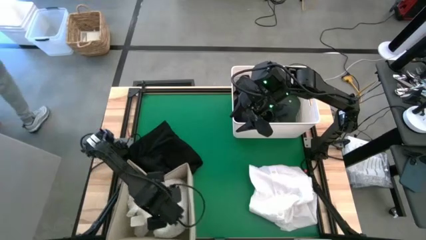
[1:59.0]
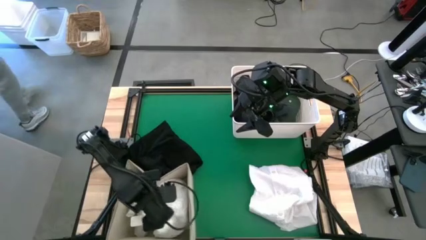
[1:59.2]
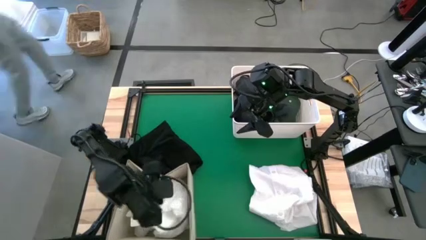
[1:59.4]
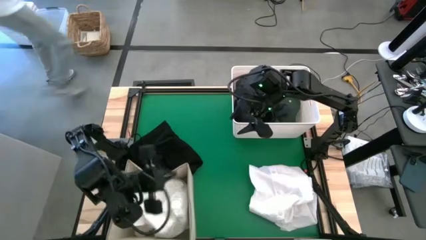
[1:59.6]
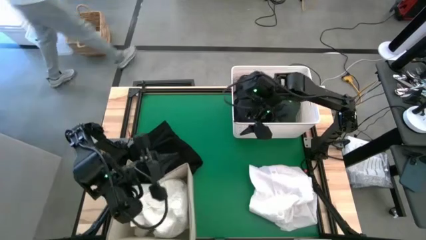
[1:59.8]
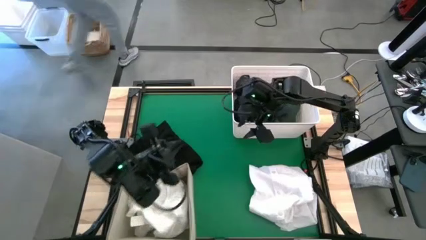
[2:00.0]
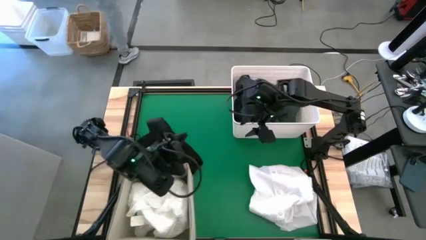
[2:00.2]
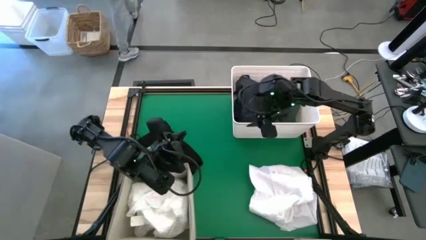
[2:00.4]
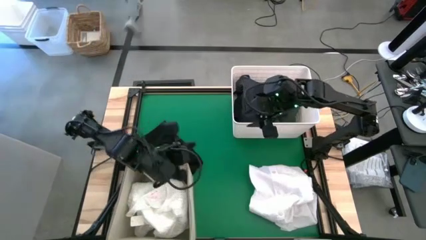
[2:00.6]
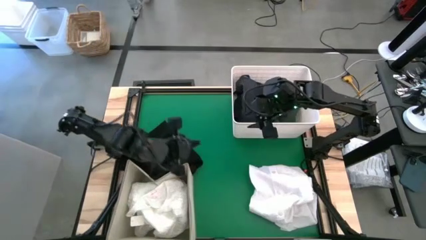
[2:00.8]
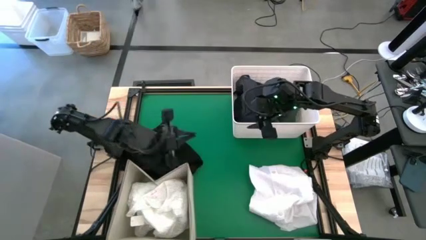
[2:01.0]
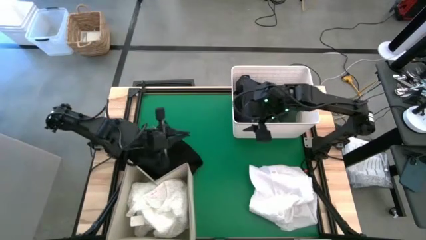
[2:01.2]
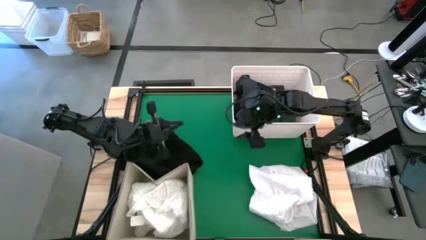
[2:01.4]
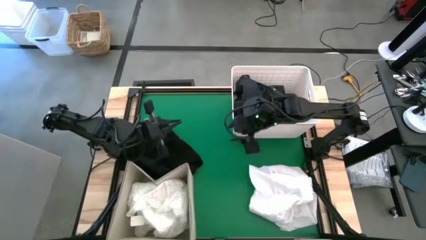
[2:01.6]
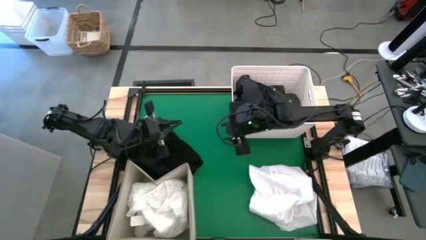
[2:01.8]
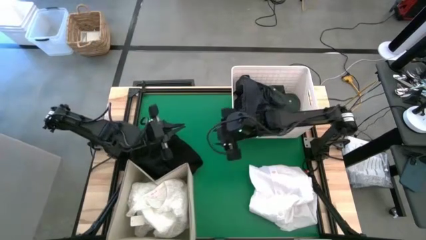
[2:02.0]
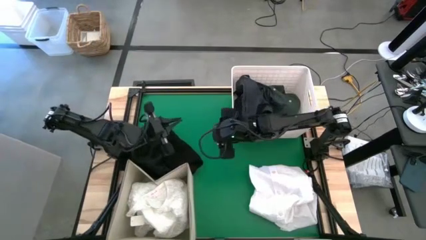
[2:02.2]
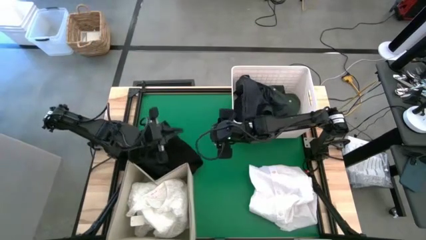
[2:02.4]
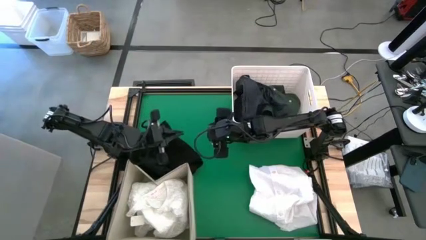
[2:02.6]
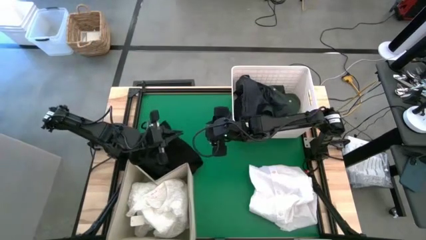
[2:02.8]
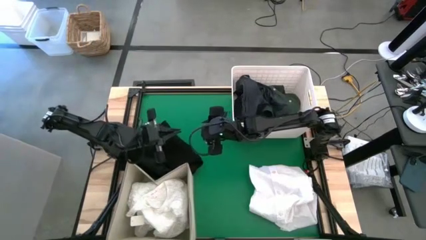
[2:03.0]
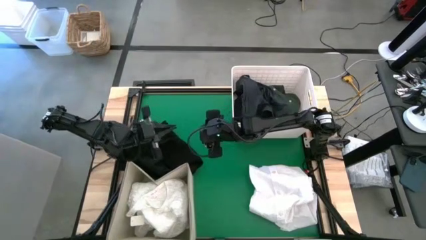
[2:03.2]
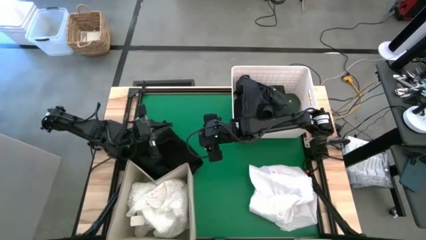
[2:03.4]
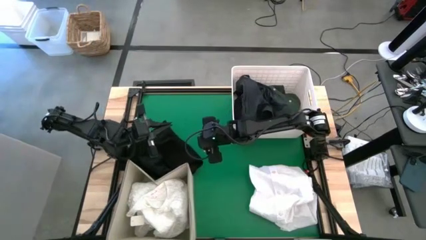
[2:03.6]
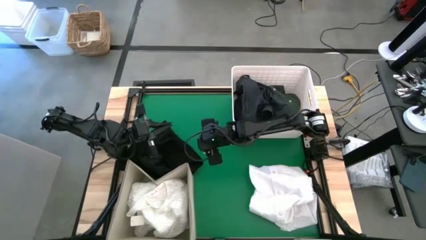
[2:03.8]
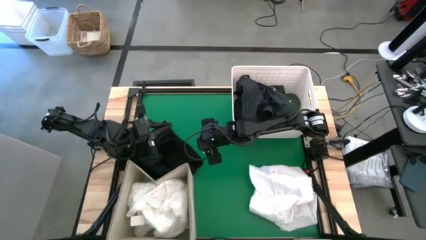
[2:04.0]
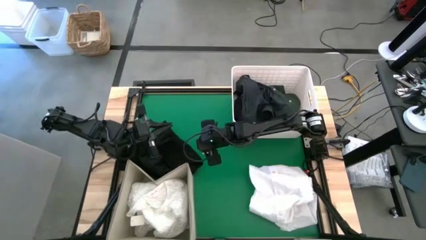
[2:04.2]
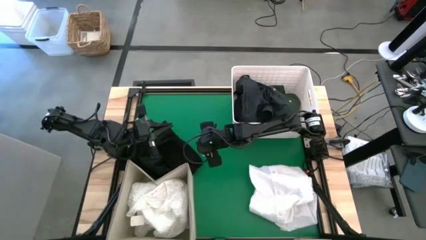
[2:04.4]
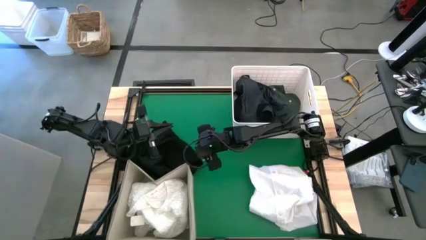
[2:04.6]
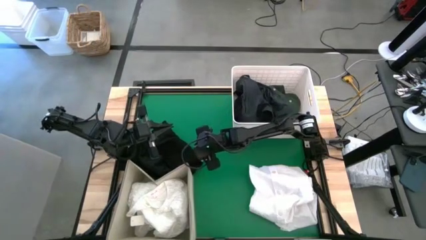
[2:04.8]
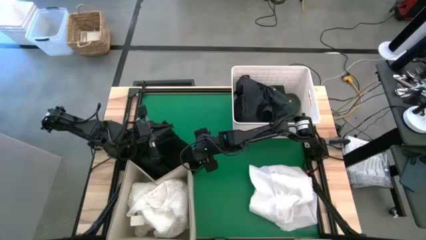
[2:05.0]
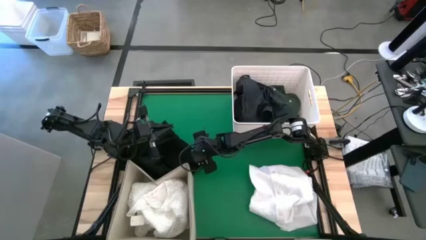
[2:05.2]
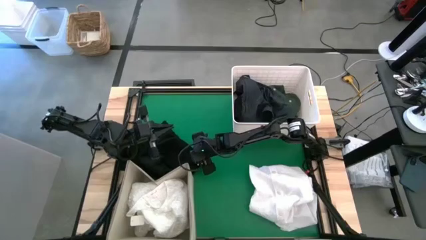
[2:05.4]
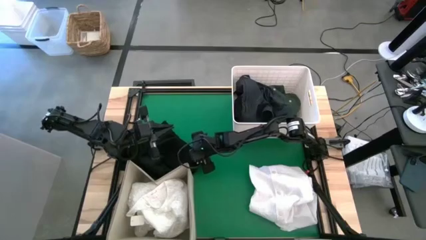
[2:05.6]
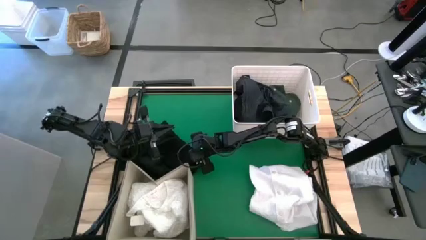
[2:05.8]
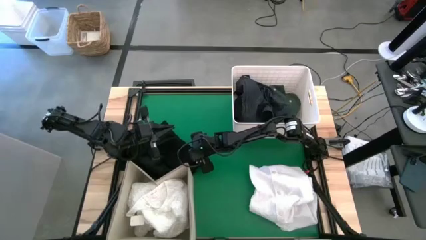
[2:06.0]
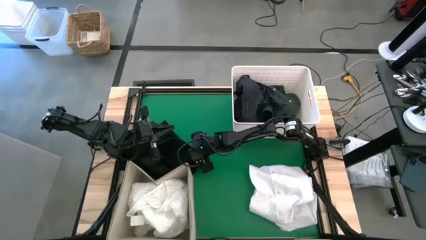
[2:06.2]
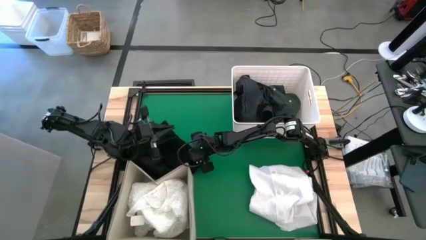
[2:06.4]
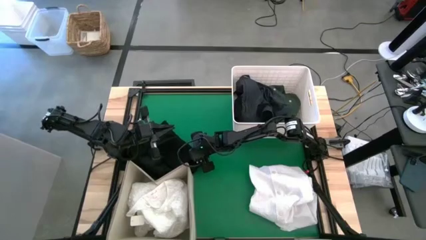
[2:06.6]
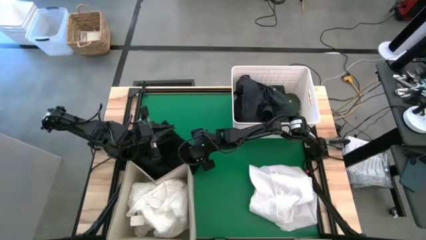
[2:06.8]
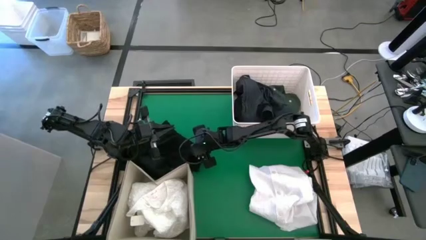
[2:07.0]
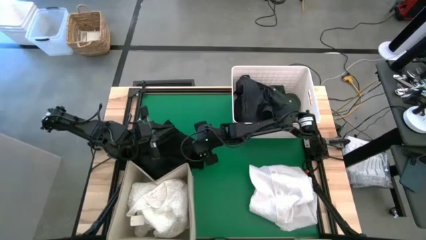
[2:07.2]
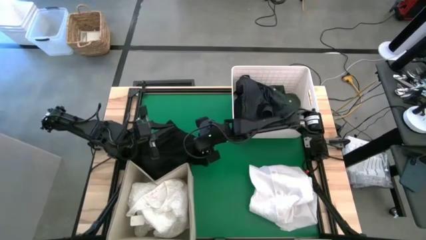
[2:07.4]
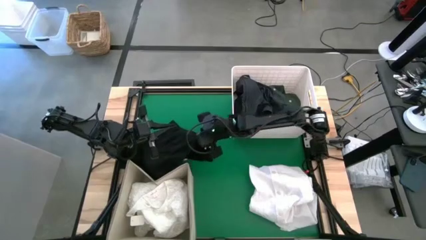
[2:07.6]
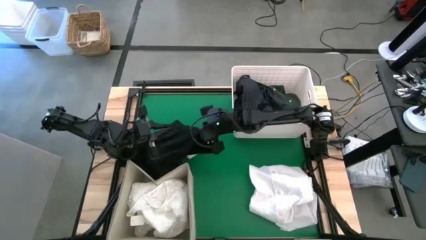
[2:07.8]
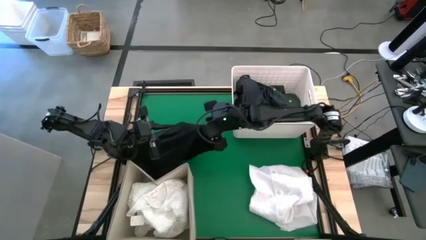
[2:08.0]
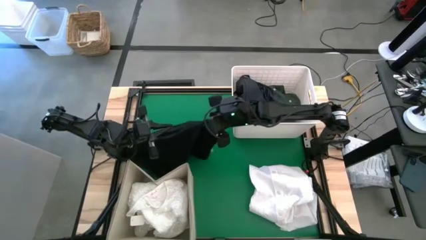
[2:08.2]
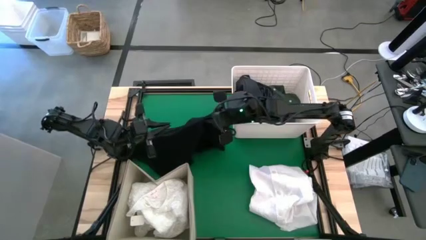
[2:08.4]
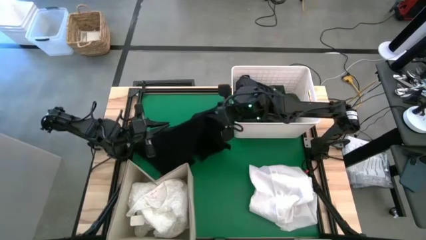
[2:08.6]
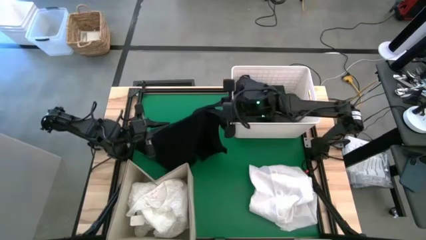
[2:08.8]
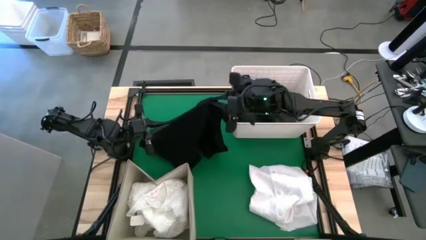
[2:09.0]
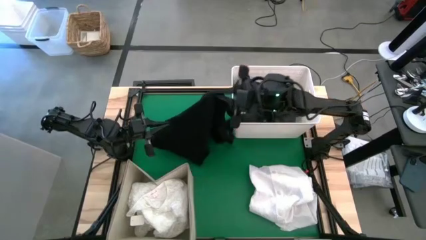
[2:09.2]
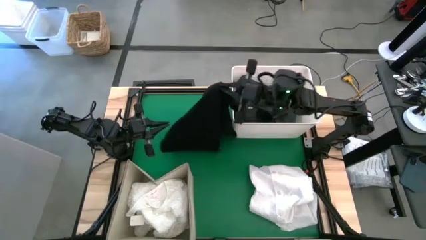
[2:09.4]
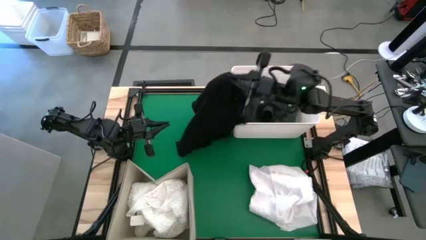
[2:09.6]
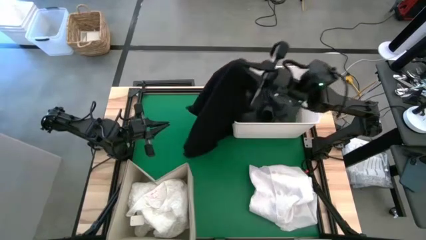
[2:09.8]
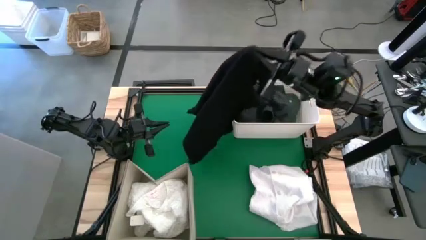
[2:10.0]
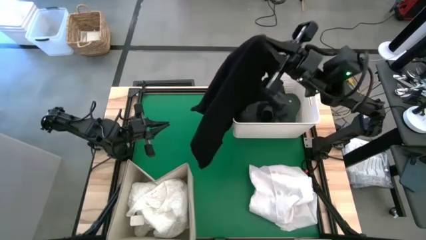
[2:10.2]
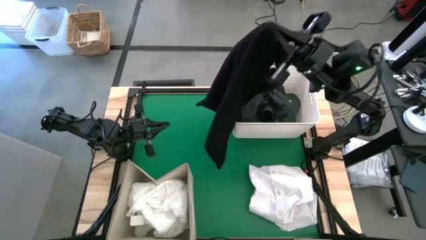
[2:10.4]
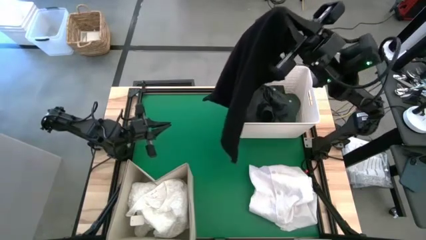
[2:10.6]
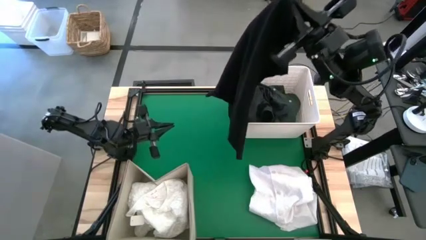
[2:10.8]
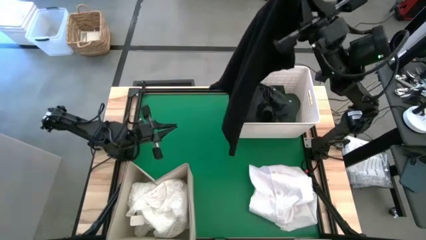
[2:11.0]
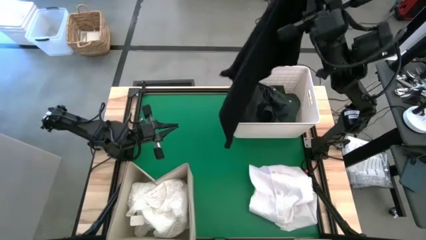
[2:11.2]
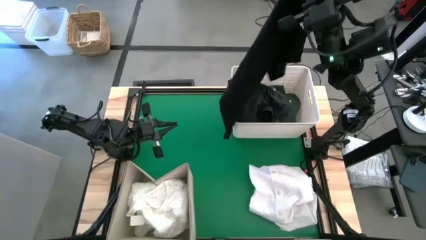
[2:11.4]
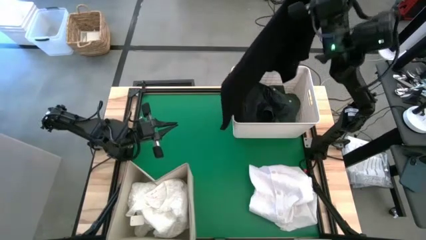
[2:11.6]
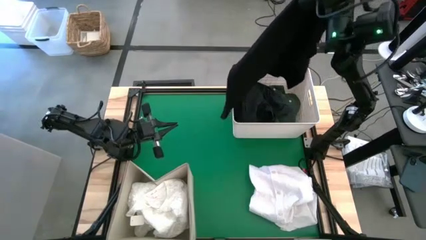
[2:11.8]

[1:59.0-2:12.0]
Task: Sort clothes
Put the black shirt into the top right white bin
